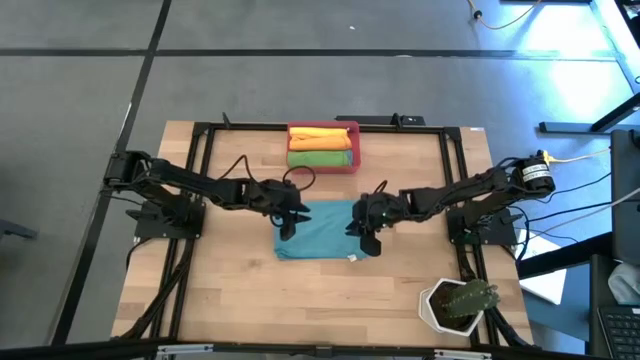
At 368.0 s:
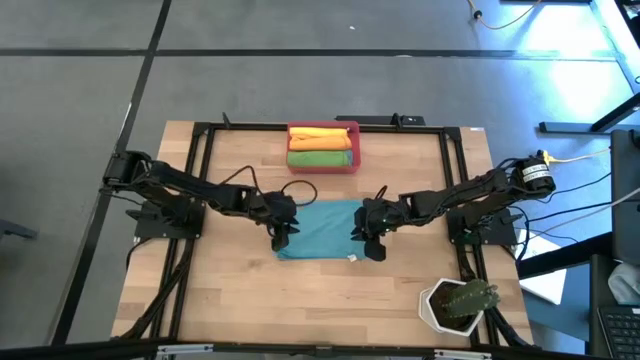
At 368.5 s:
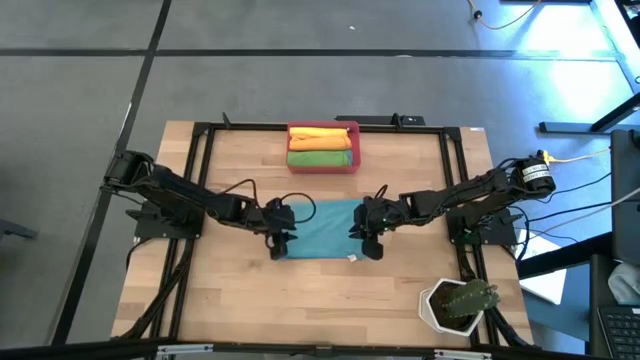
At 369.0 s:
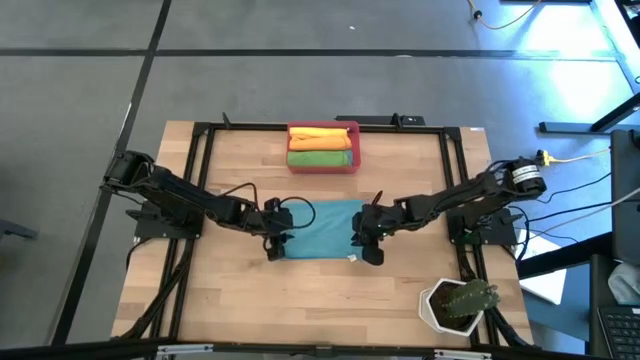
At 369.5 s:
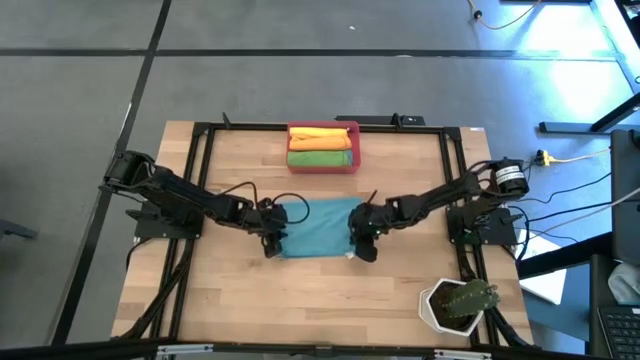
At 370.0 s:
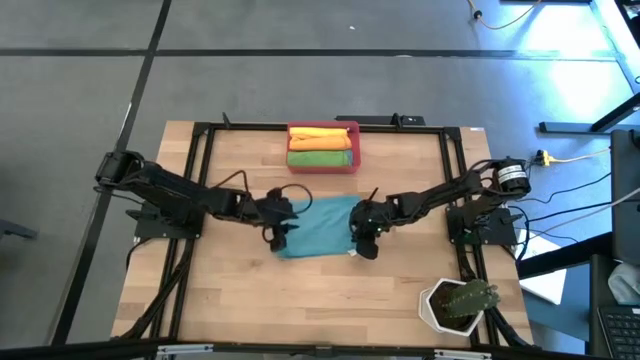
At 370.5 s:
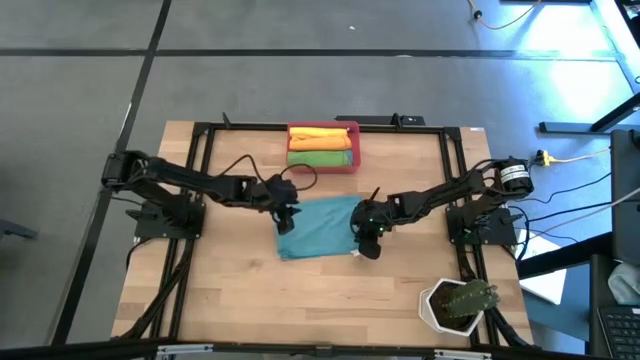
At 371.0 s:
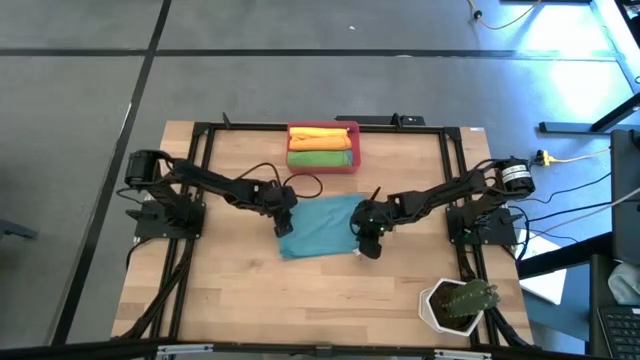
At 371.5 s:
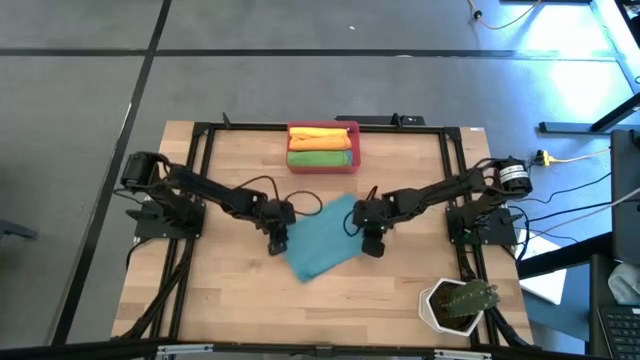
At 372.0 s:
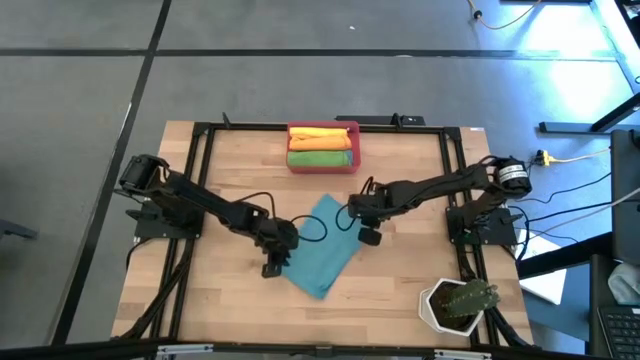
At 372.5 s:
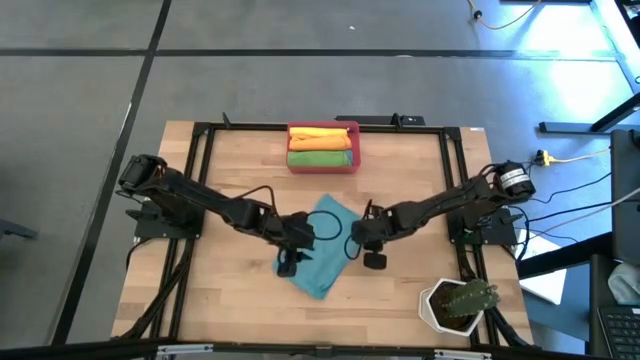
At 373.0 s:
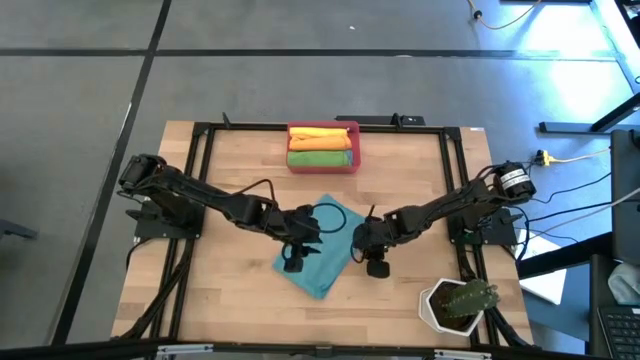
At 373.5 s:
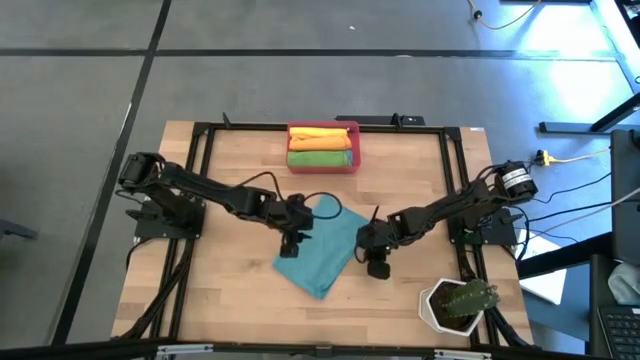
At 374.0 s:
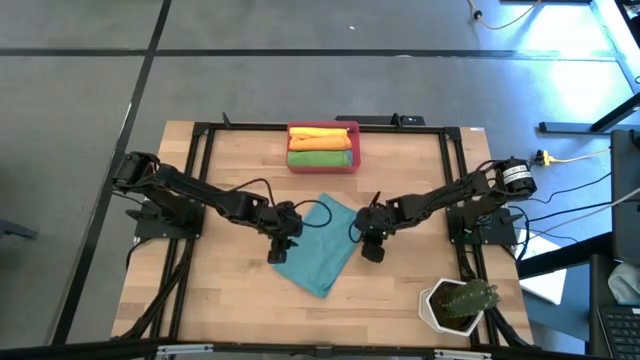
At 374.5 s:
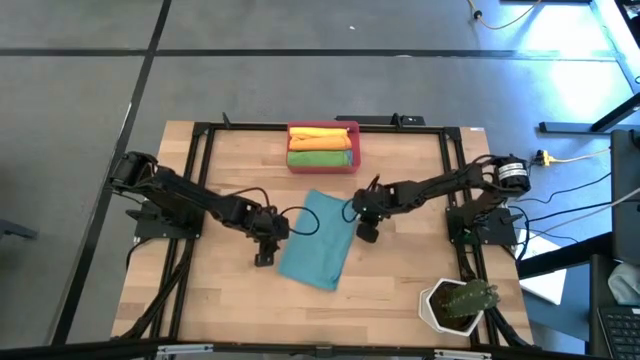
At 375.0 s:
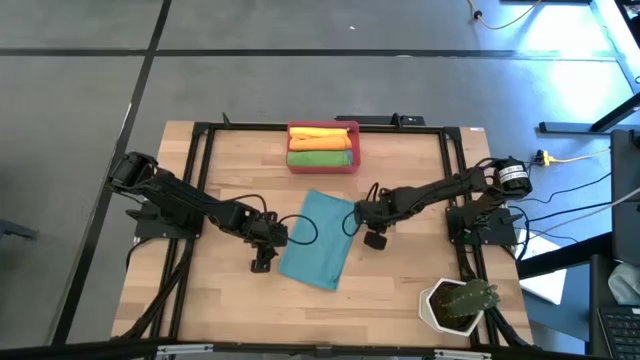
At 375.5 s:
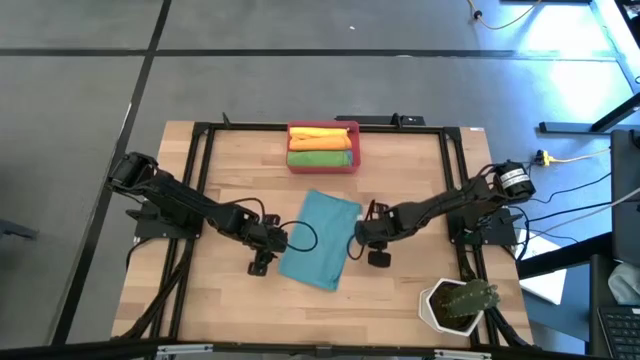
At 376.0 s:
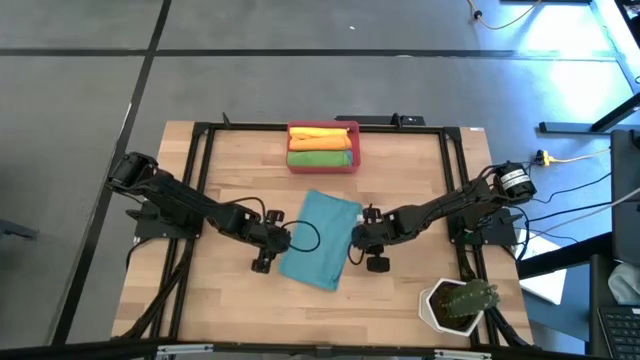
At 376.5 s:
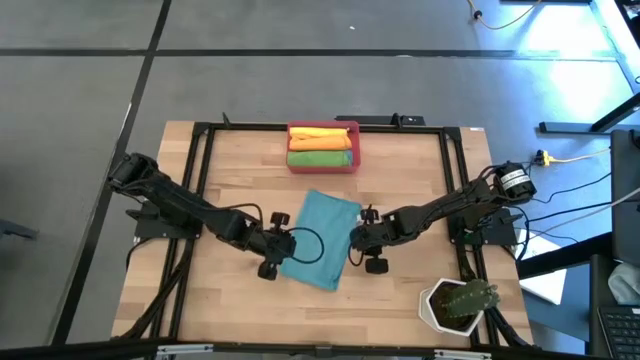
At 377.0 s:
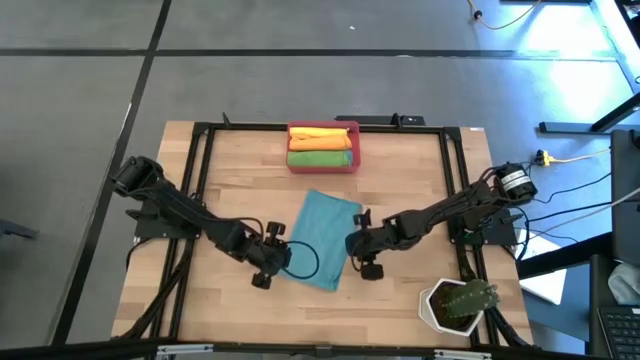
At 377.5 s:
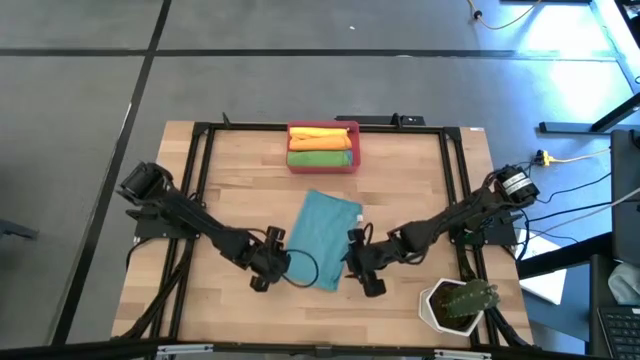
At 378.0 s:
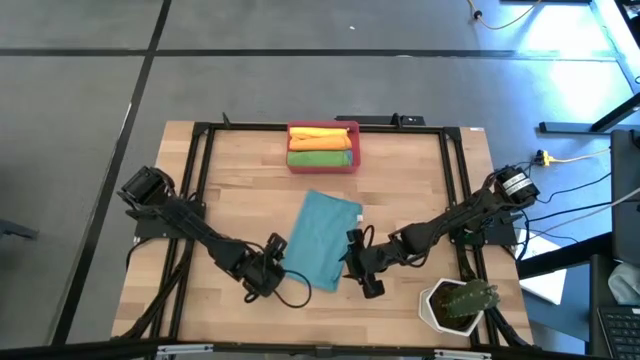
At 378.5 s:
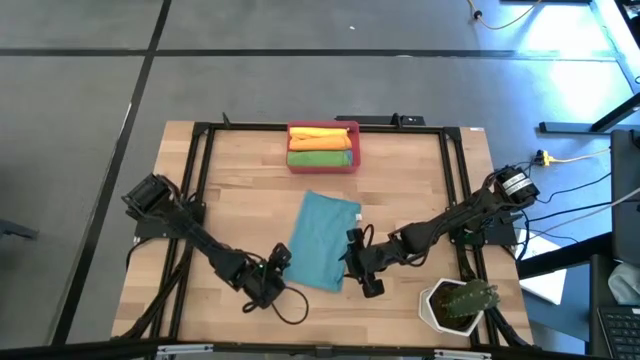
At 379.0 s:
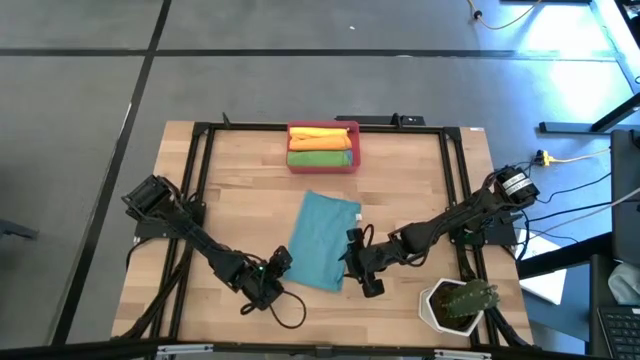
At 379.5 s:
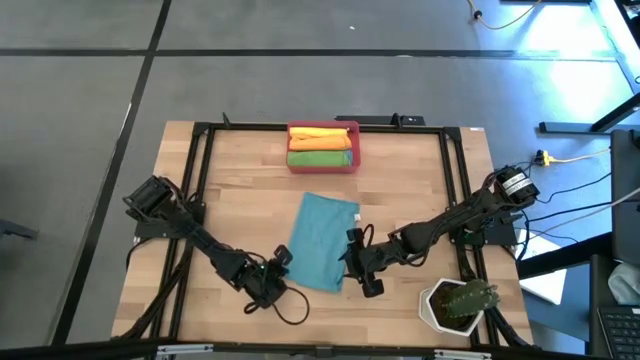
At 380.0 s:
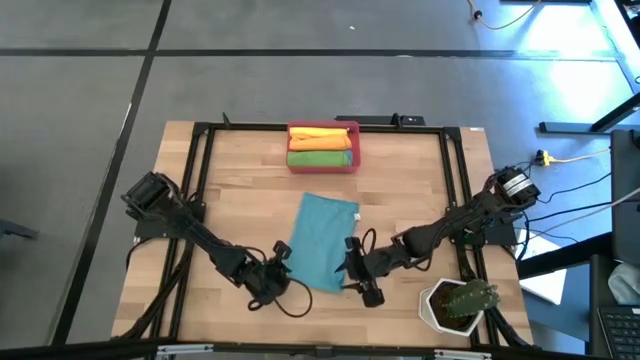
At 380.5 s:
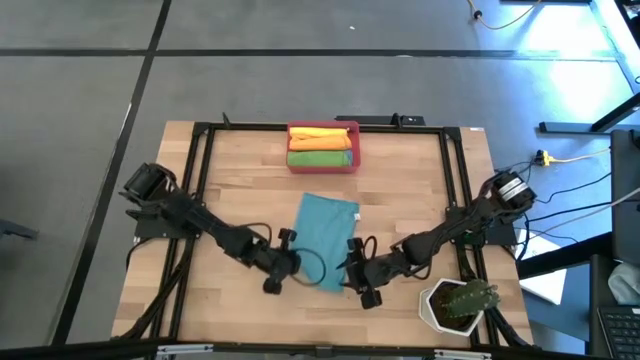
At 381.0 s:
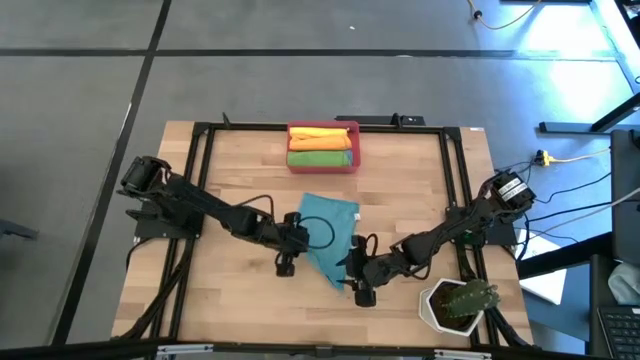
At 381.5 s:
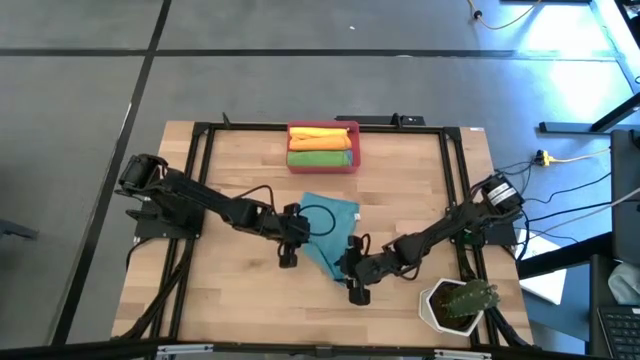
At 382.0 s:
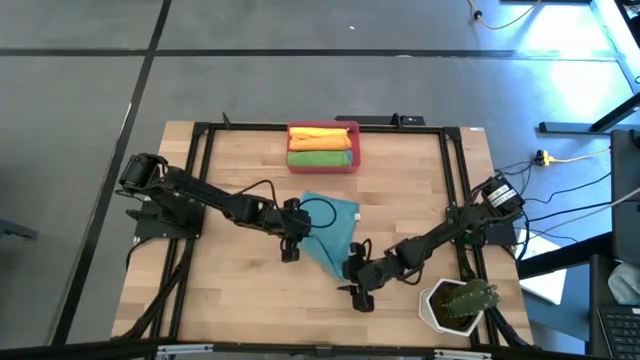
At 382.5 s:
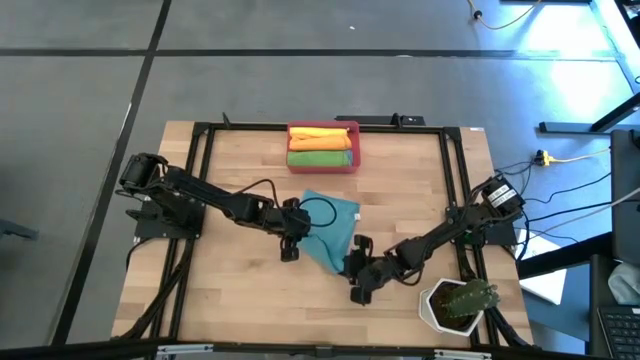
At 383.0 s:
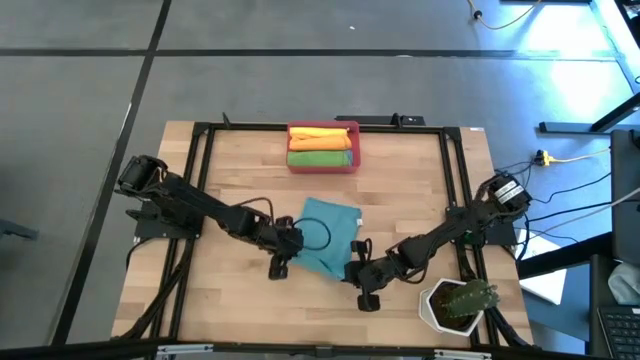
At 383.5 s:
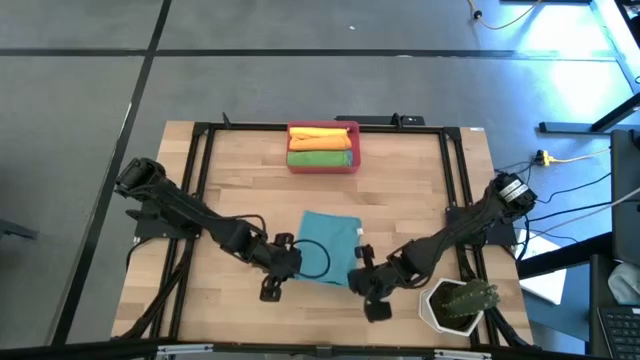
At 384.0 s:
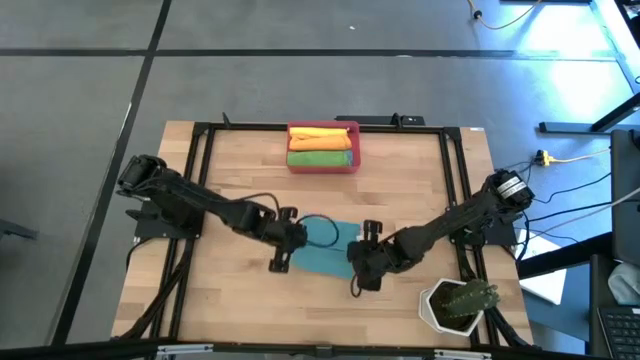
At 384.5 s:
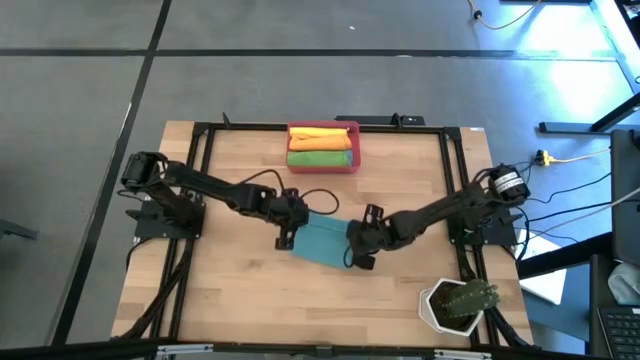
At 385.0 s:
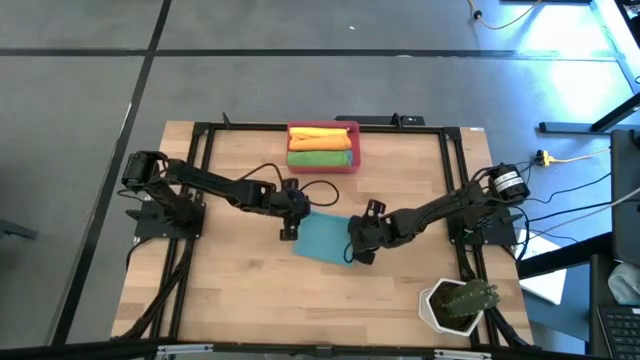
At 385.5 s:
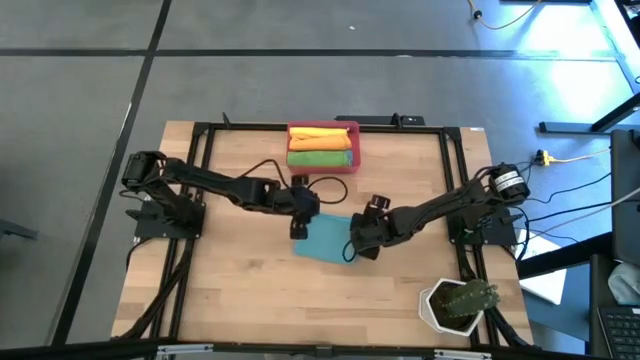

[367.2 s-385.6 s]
Task: Roll microfiber towels into tight, uniform cylinder then place into a basket
Fold the blue microfiber towel

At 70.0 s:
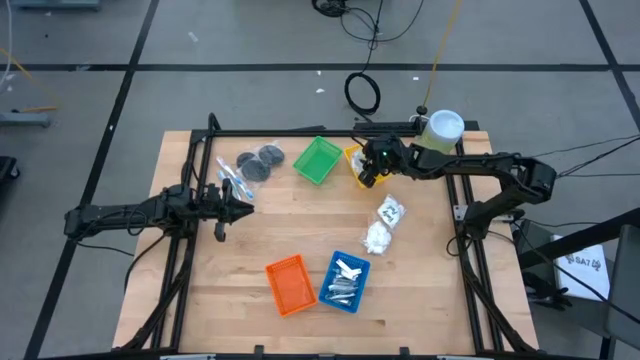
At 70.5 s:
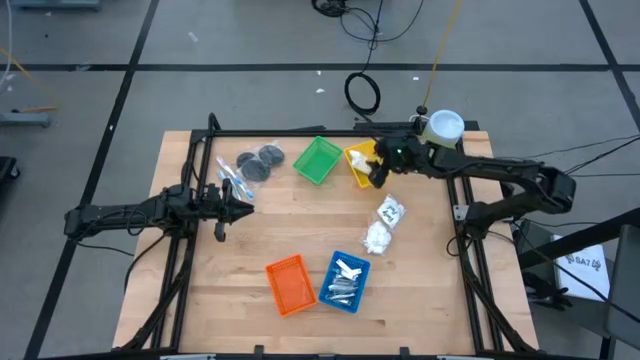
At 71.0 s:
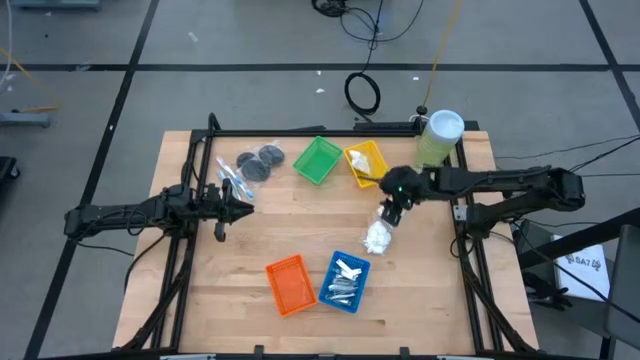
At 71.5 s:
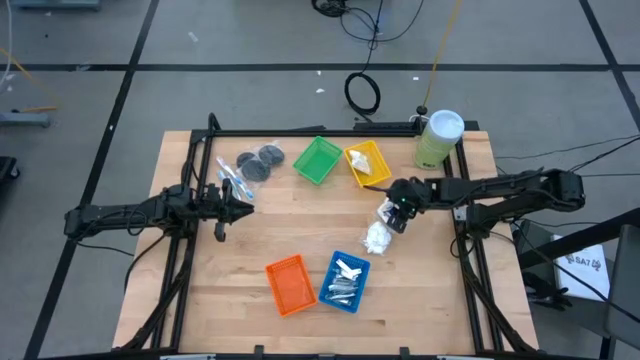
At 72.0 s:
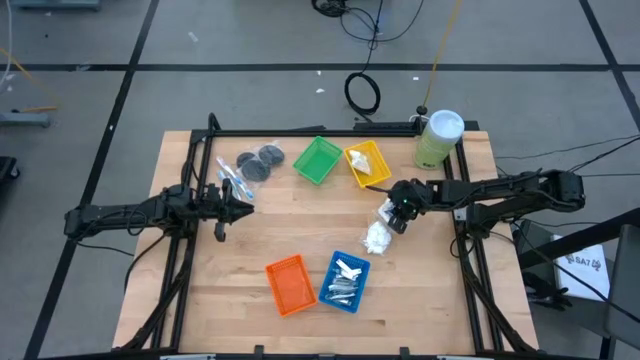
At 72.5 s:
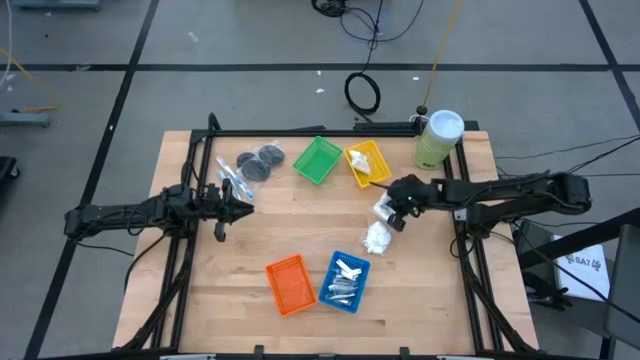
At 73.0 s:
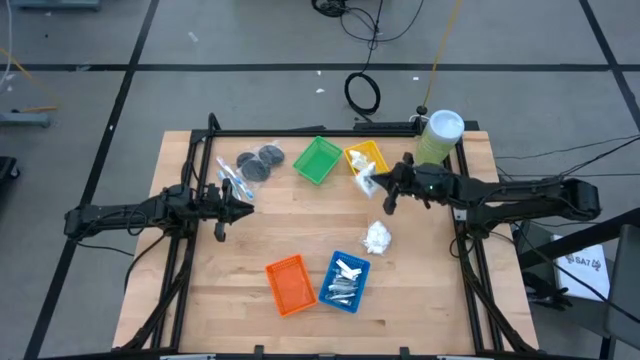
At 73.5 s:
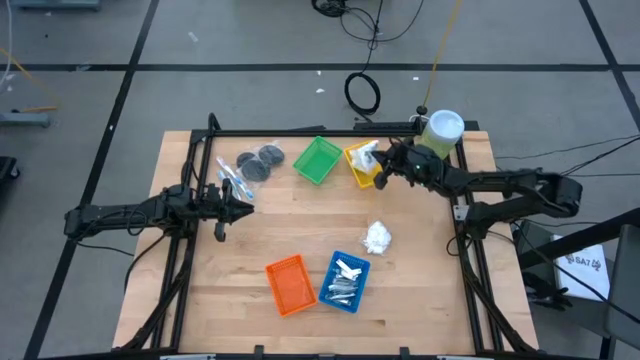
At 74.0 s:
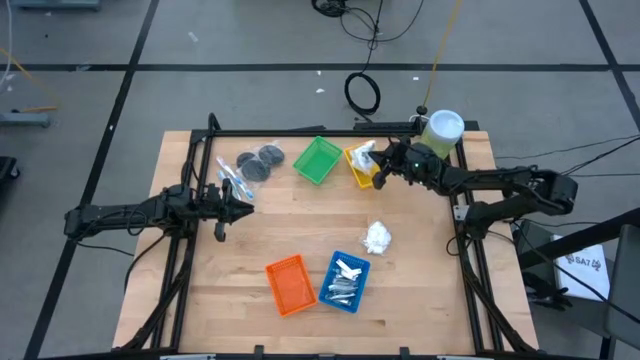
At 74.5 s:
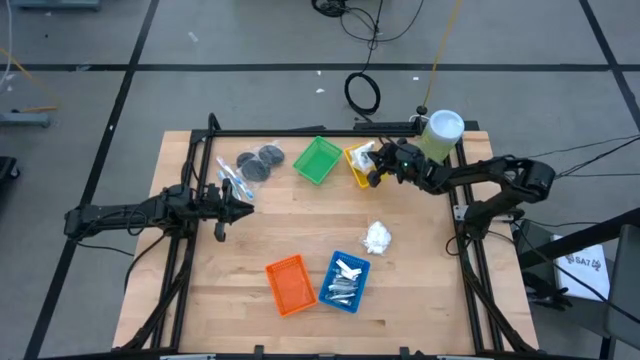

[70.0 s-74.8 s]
Task: Pick & Place Travel size toiletries
Put the white cotton pack into the yellow bin
